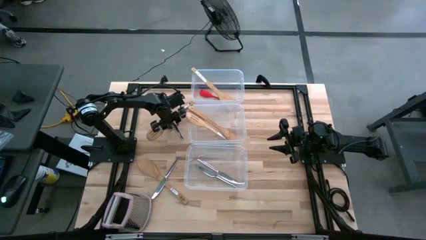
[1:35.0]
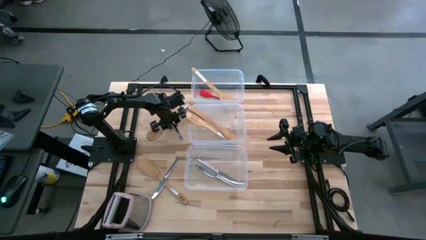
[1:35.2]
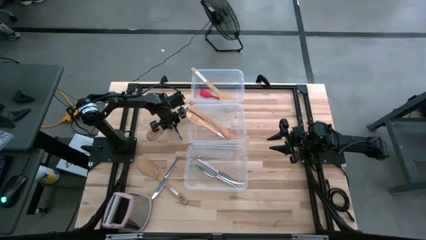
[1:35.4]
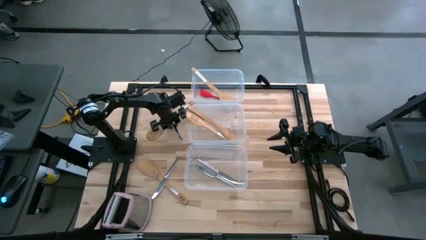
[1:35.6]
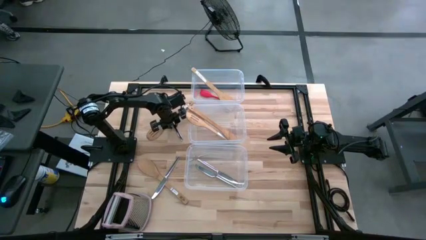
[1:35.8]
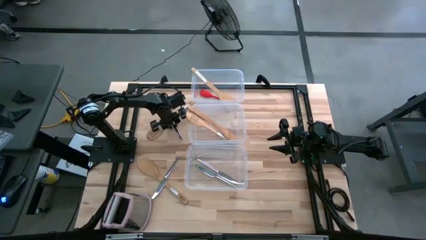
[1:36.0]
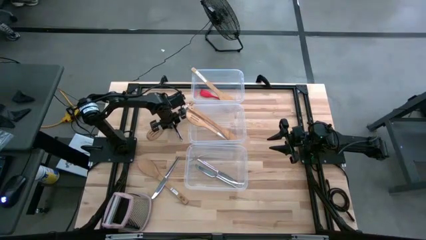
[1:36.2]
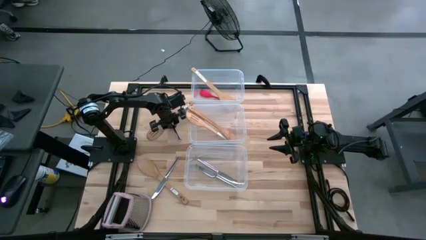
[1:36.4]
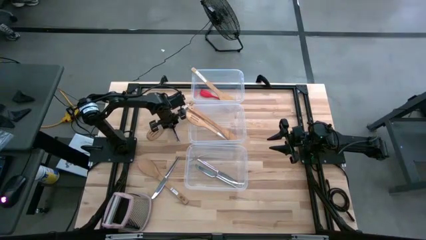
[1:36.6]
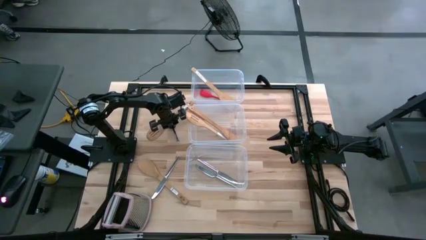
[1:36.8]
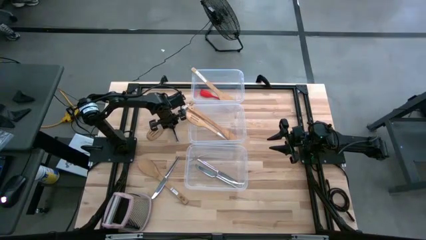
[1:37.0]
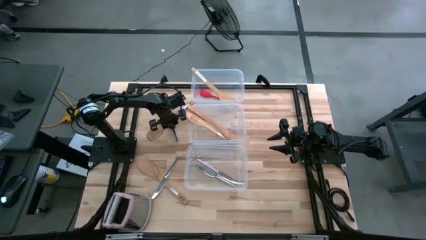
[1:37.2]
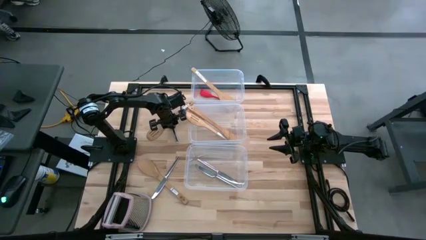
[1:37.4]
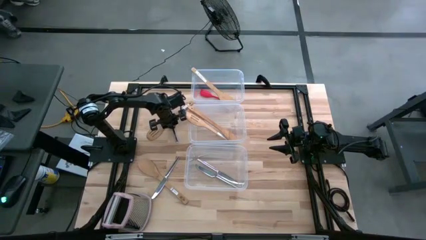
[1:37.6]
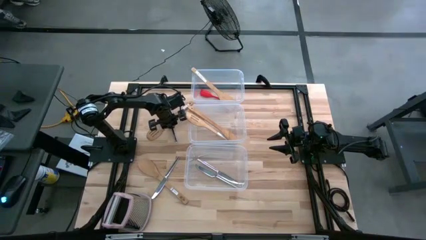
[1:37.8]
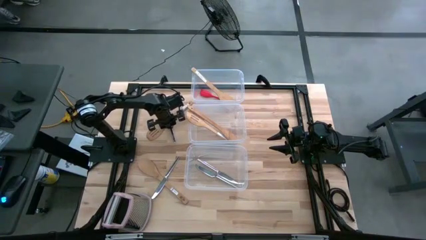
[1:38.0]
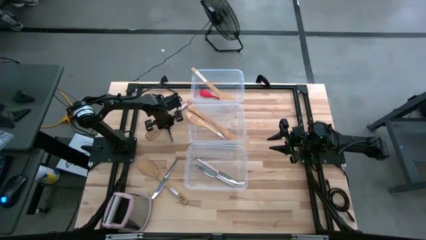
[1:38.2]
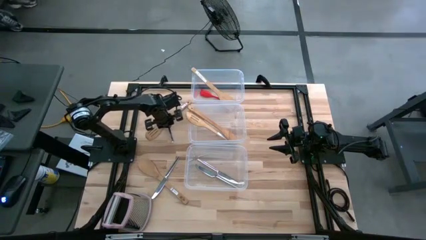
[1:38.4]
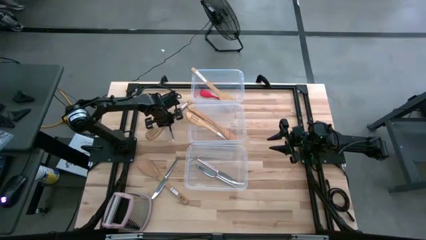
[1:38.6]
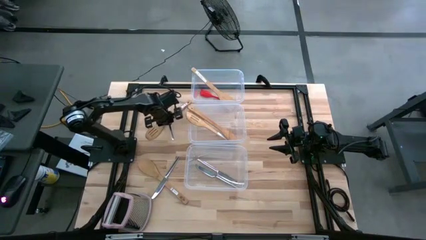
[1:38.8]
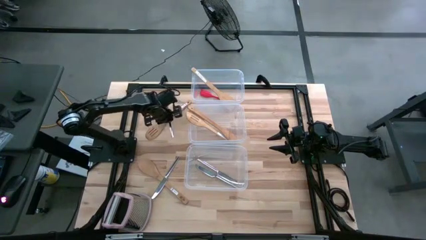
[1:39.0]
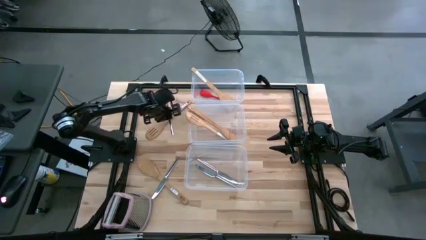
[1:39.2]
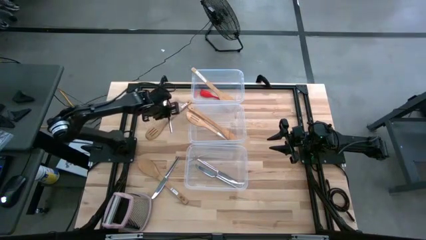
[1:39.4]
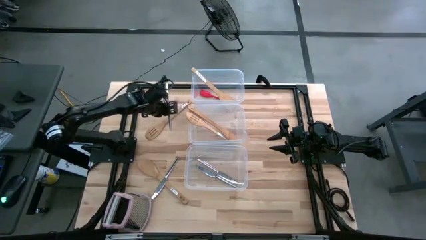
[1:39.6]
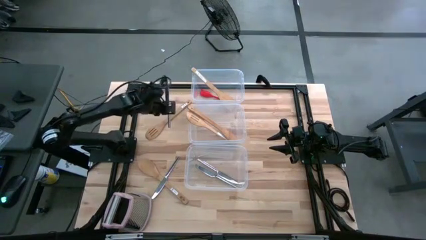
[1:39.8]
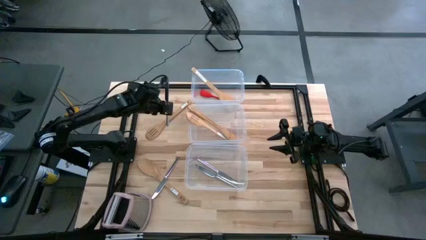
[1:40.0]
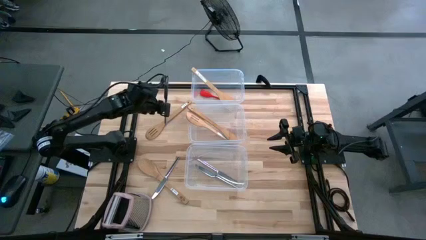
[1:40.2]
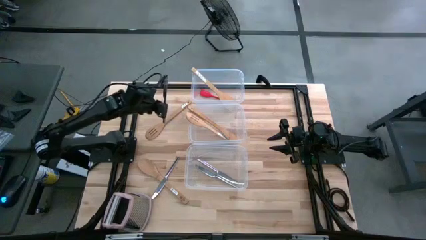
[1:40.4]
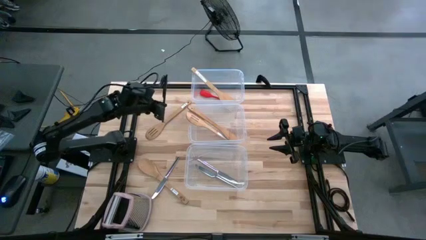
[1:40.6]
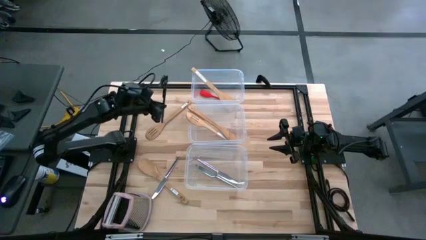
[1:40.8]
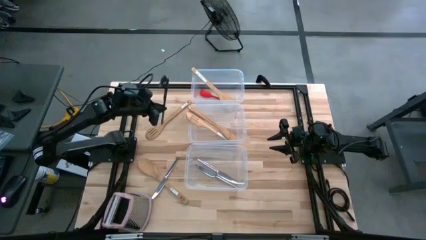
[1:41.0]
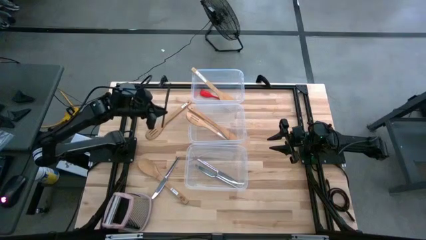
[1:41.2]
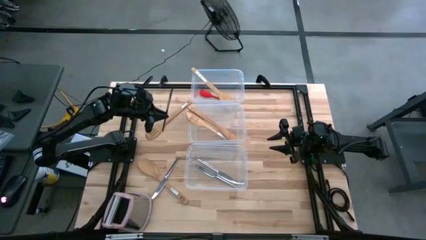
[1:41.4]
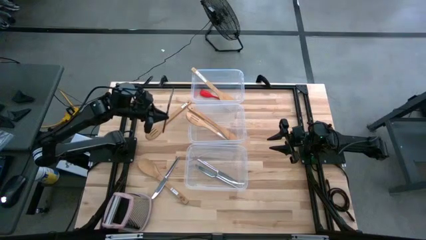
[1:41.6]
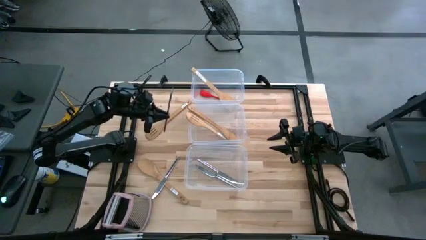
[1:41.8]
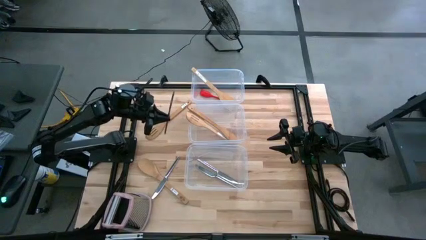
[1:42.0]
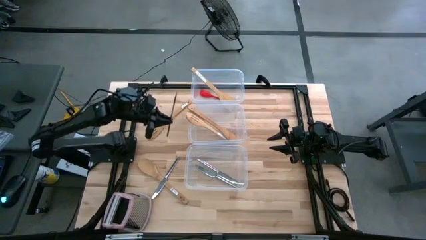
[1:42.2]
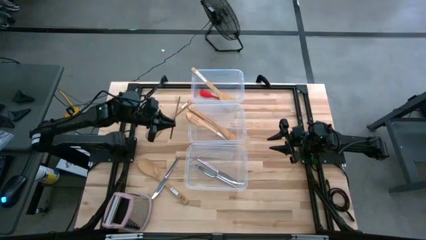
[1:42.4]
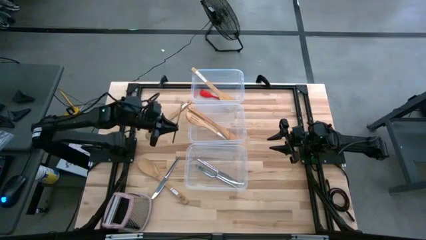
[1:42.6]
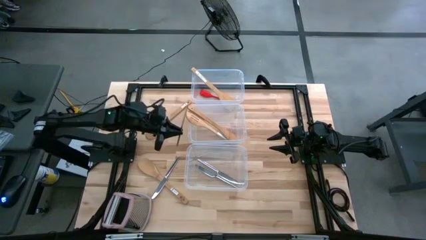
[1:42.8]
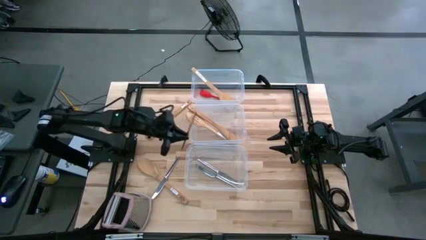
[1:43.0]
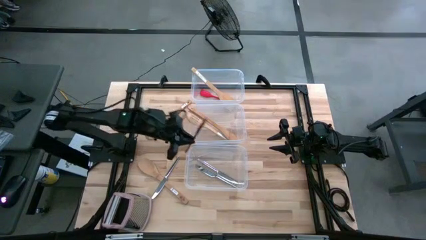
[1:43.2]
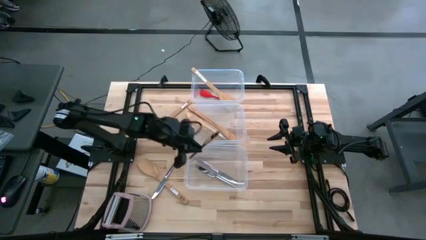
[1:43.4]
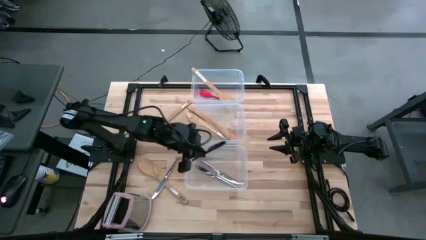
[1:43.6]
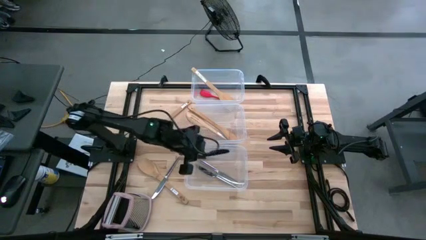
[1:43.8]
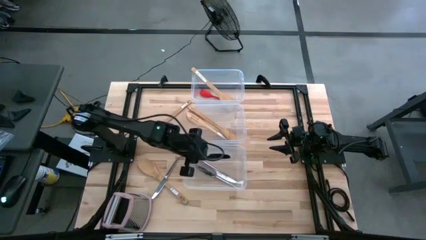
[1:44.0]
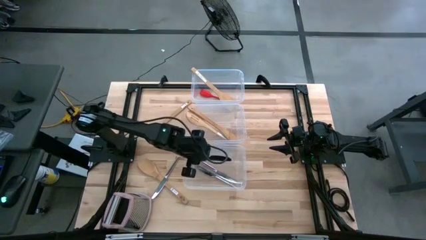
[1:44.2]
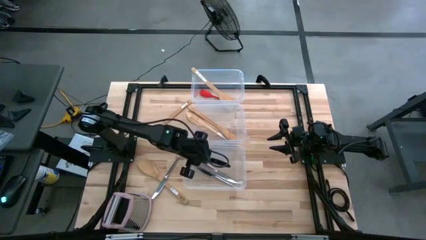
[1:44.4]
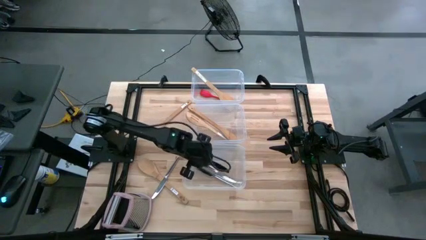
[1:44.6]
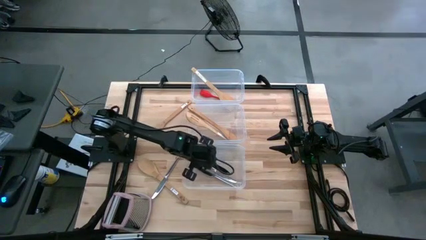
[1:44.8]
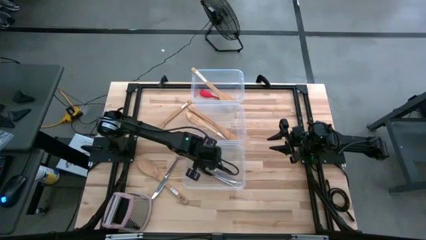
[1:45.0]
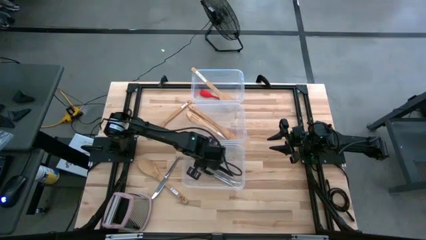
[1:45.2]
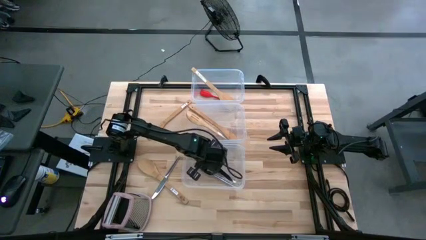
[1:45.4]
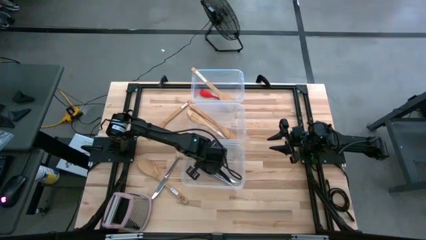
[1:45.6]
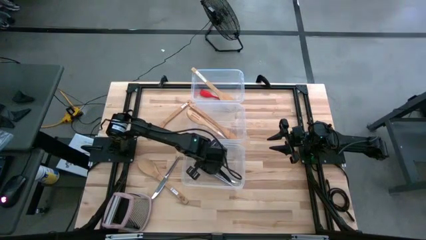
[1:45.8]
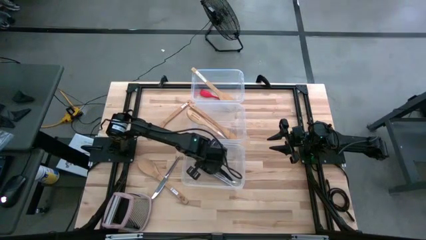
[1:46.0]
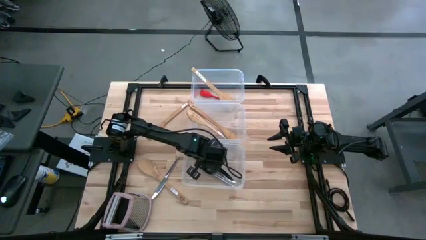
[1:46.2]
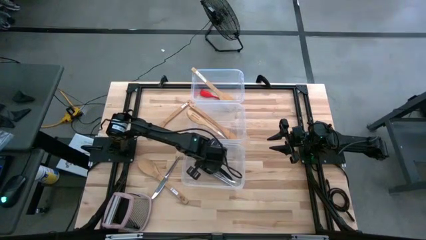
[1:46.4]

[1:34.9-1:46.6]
Task: Pick & Place Kitchen Items
Put the silver knife into the bottom transparent bin

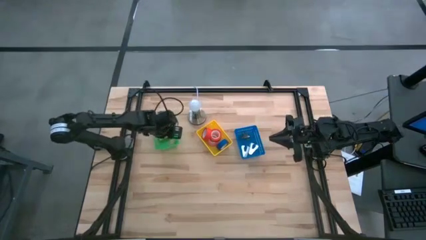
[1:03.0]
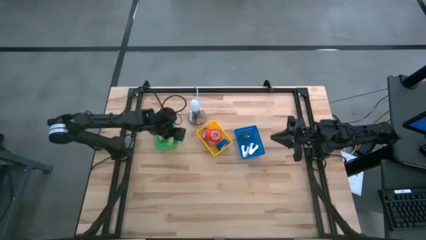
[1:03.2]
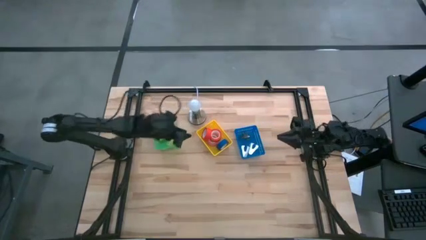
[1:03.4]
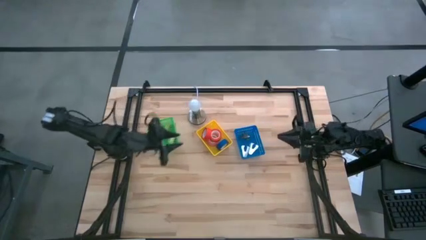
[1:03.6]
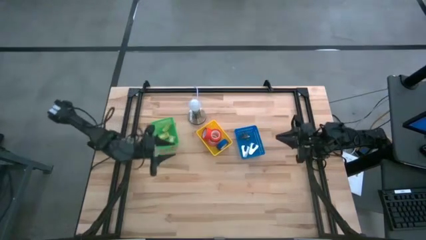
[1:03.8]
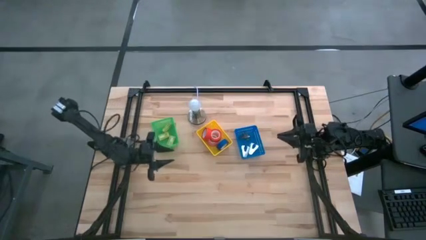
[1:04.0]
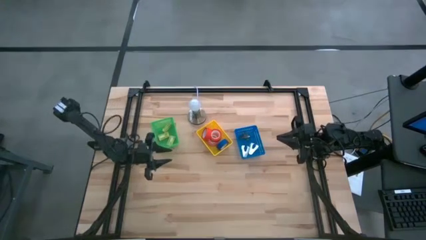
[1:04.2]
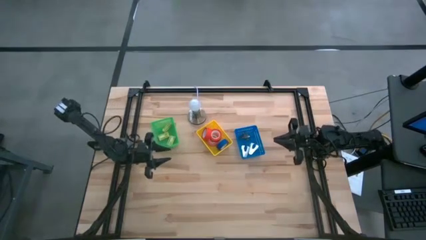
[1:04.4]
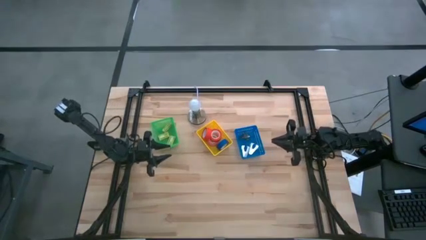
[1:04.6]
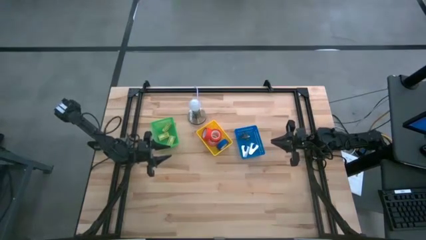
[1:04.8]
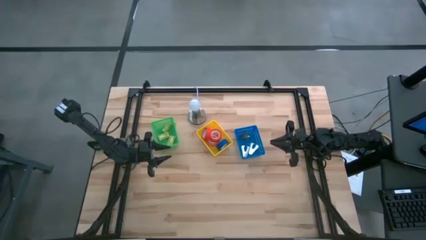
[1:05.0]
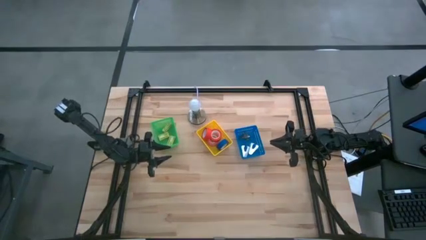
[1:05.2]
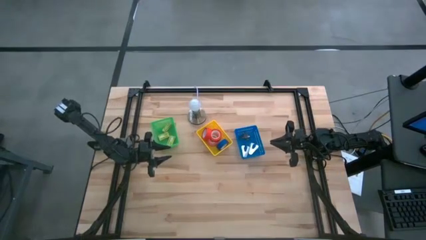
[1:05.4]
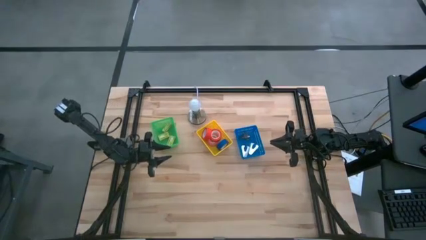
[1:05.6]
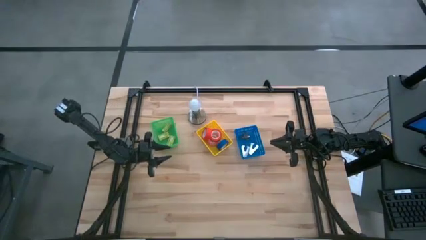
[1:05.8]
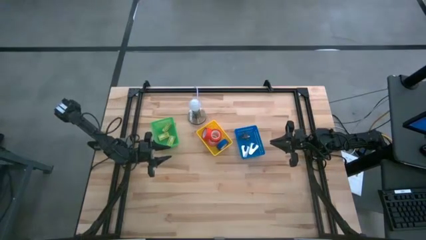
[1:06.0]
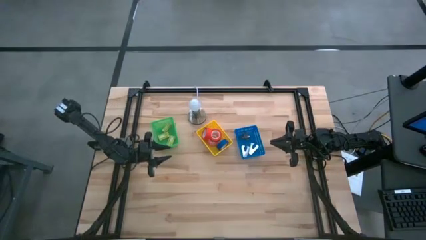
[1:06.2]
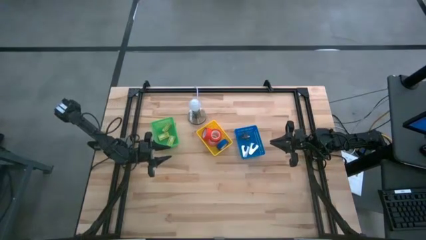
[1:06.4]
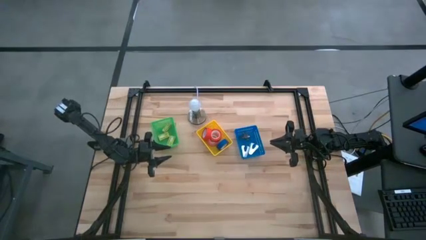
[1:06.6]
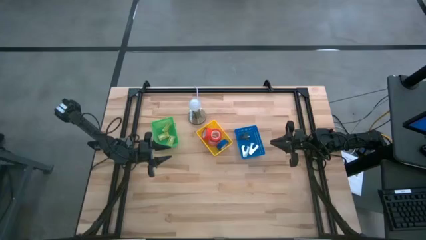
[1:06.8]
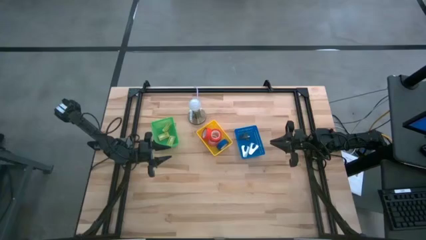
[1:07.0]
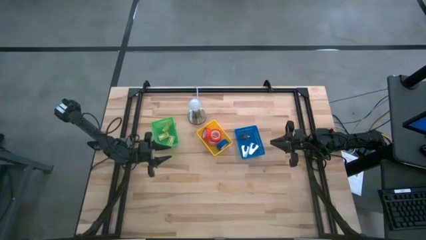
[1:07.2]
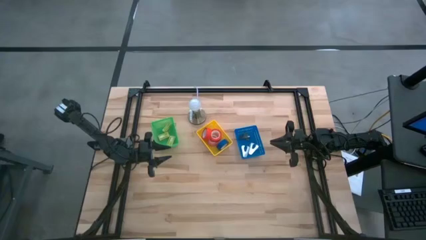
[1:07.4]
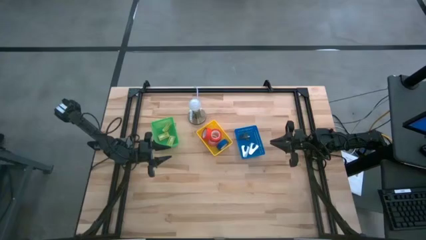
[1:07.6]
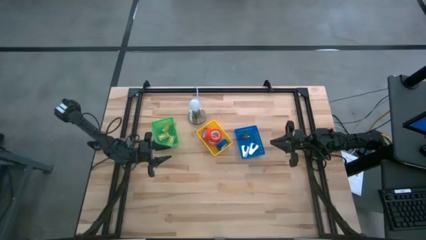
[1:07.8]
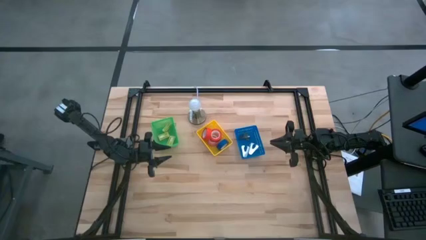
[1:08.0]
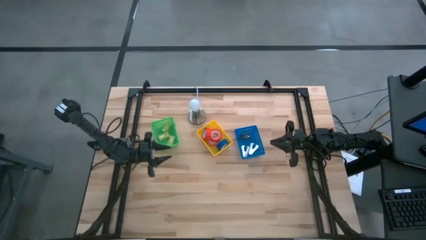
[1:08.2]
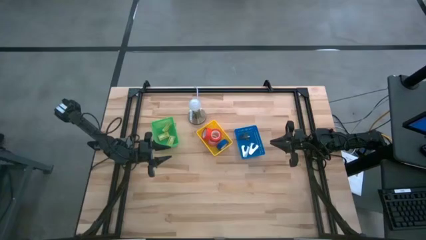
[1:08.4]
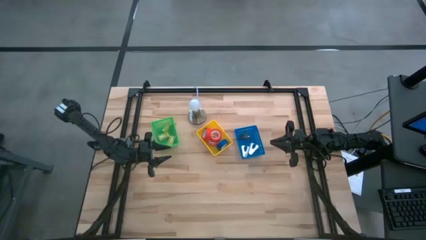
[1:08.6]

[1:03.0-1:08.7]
Task: Pick and place Stapler, Stapler remover, tape
Return to Home Position
